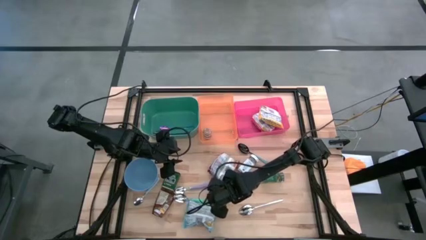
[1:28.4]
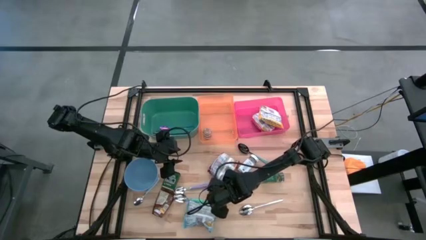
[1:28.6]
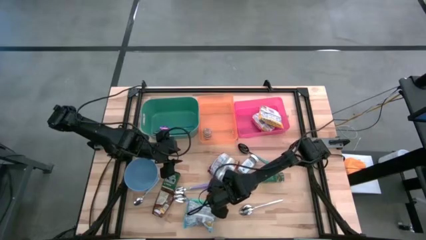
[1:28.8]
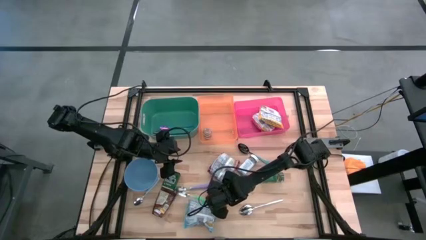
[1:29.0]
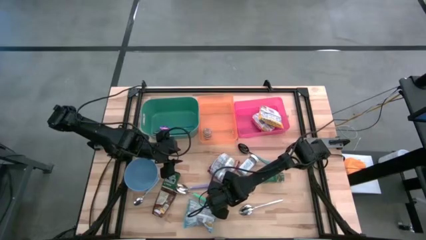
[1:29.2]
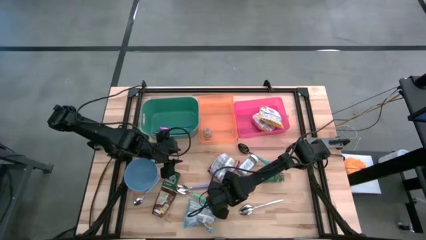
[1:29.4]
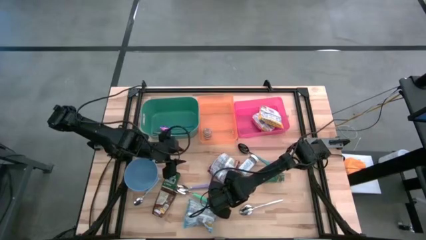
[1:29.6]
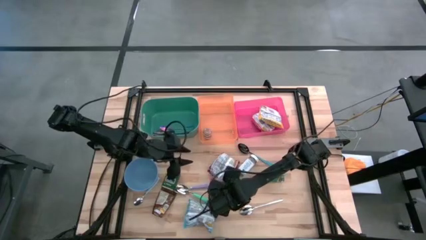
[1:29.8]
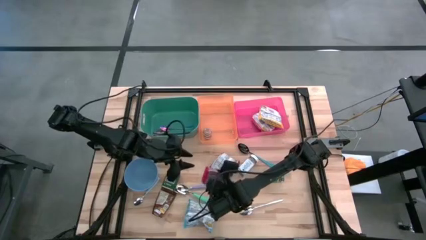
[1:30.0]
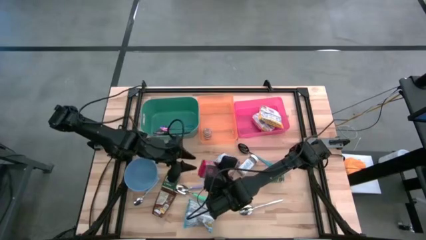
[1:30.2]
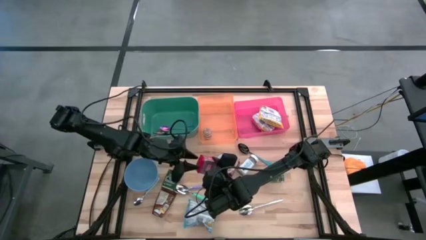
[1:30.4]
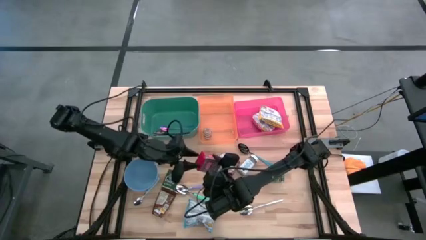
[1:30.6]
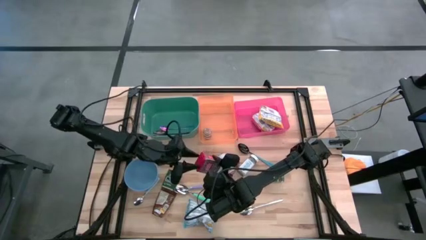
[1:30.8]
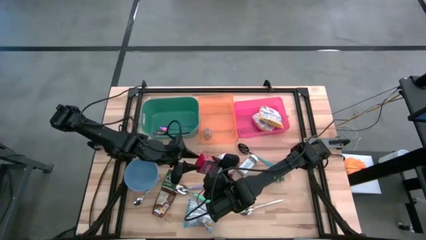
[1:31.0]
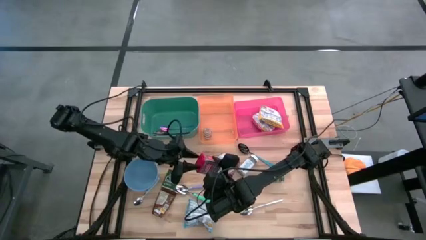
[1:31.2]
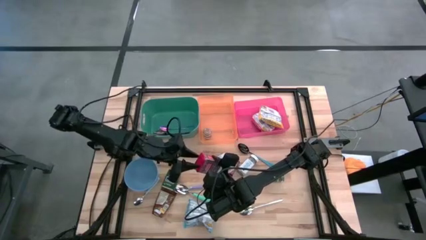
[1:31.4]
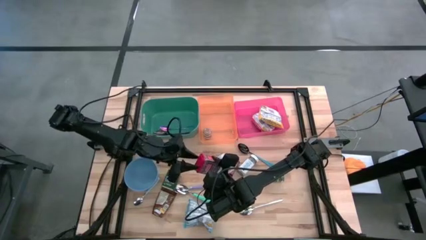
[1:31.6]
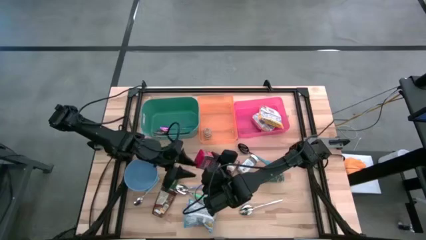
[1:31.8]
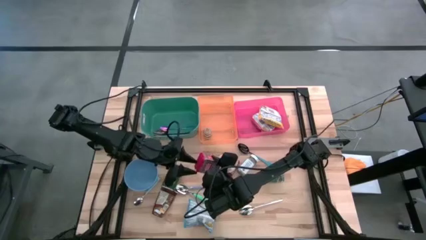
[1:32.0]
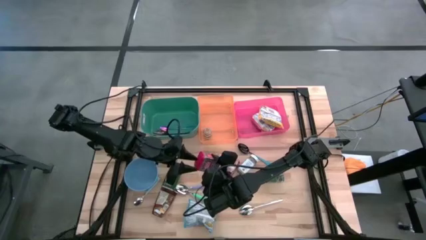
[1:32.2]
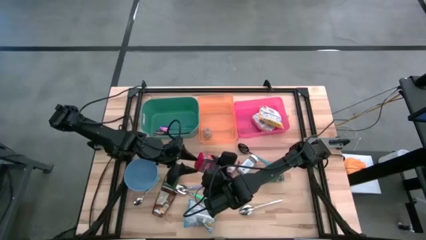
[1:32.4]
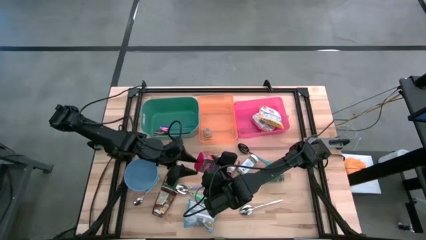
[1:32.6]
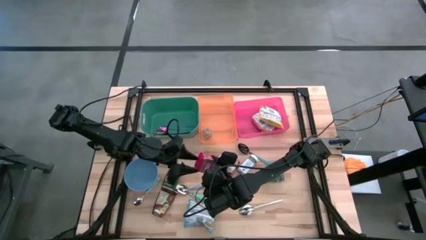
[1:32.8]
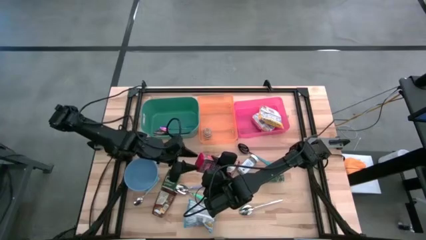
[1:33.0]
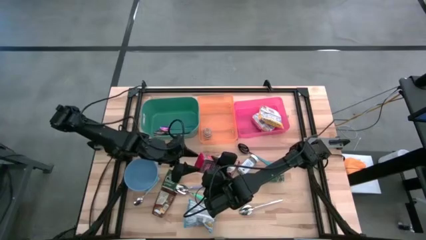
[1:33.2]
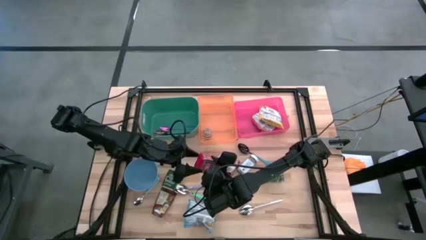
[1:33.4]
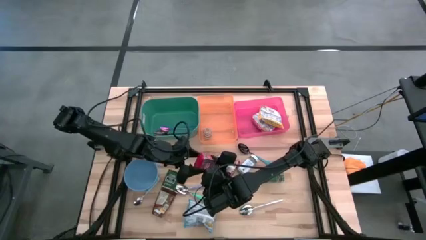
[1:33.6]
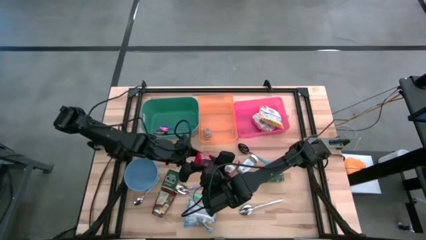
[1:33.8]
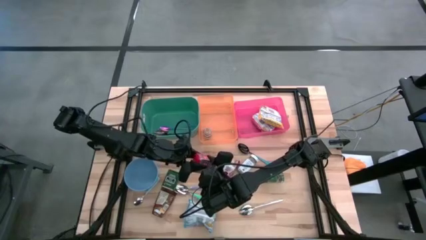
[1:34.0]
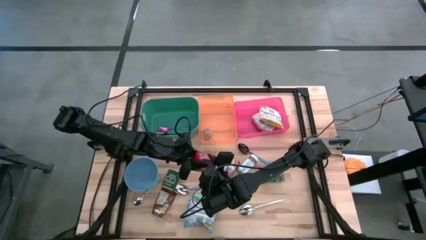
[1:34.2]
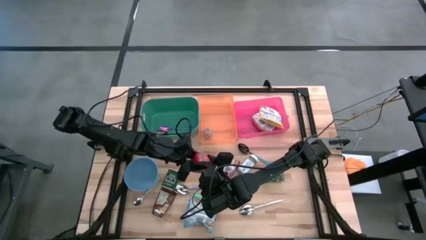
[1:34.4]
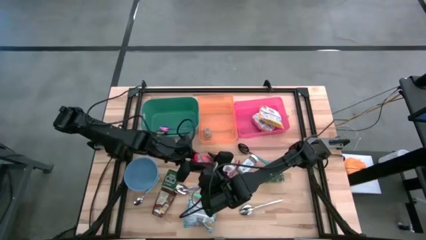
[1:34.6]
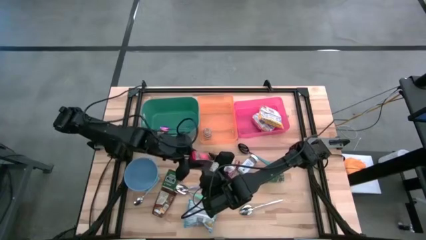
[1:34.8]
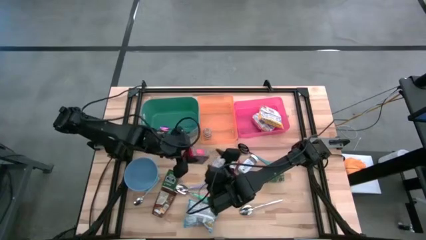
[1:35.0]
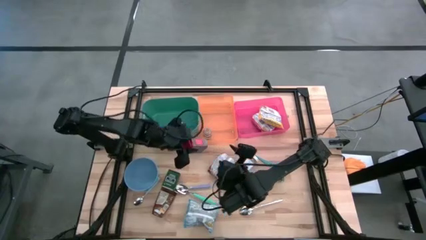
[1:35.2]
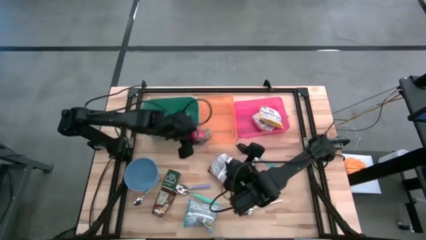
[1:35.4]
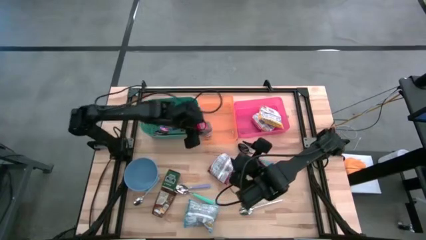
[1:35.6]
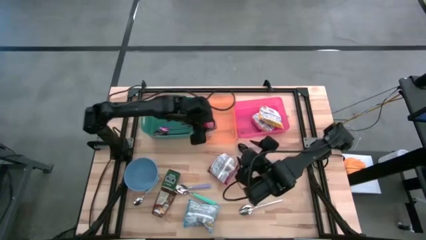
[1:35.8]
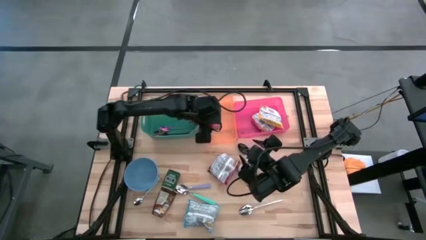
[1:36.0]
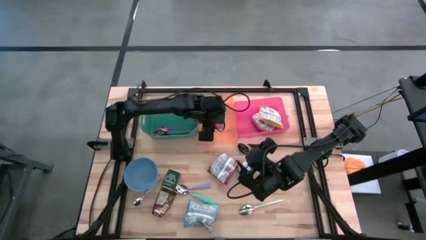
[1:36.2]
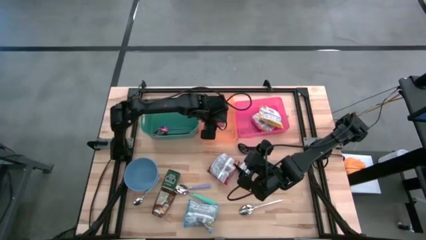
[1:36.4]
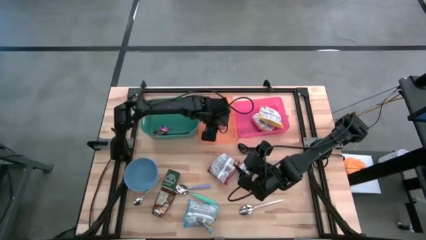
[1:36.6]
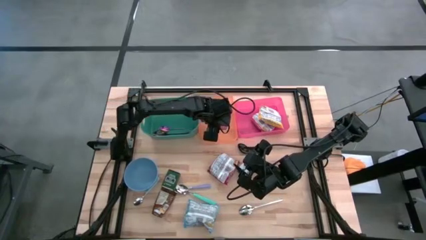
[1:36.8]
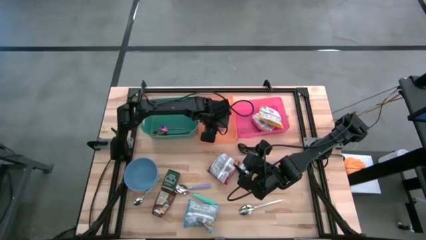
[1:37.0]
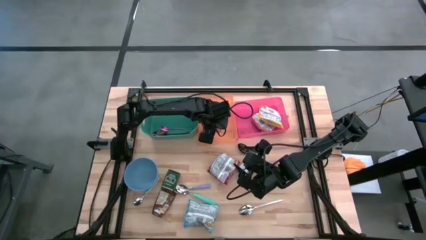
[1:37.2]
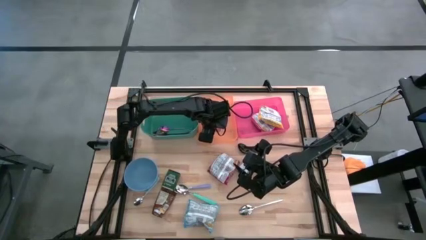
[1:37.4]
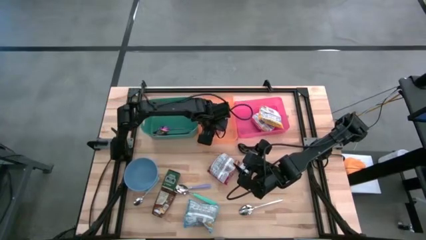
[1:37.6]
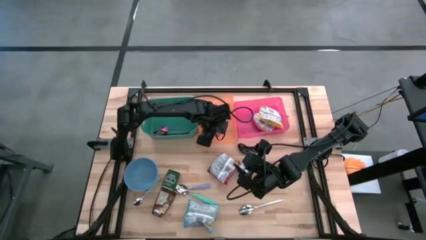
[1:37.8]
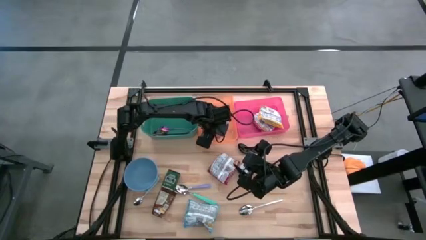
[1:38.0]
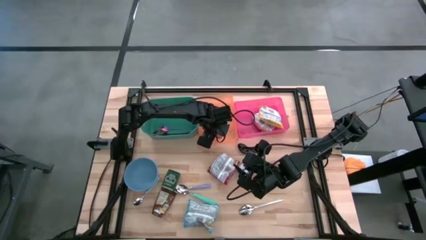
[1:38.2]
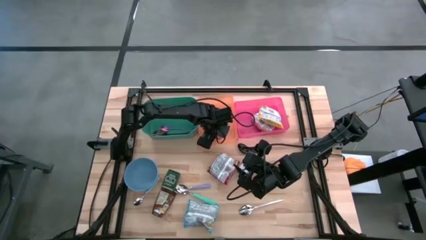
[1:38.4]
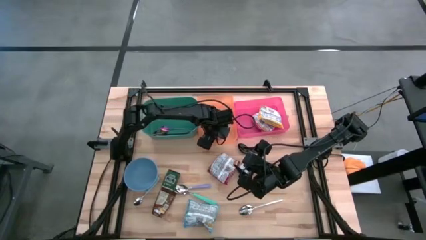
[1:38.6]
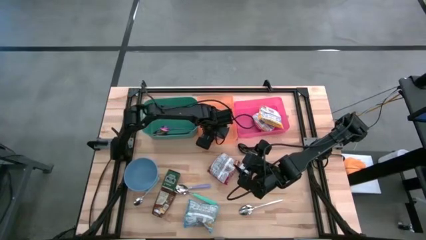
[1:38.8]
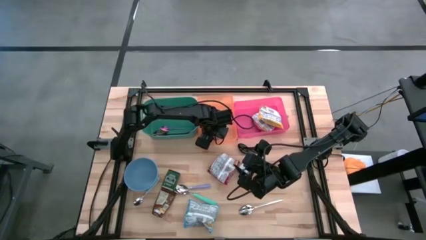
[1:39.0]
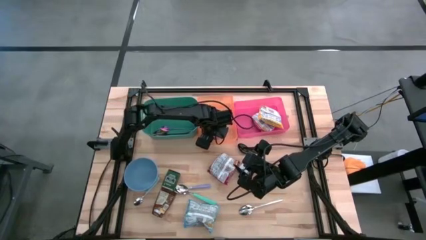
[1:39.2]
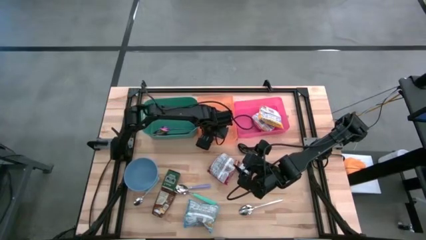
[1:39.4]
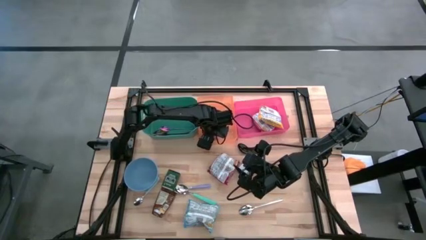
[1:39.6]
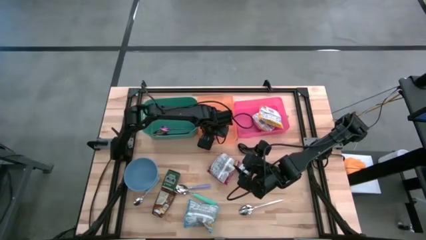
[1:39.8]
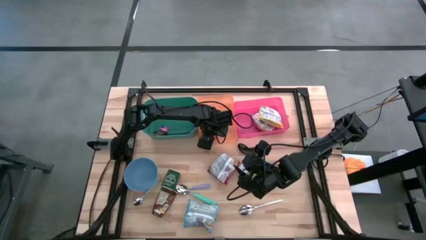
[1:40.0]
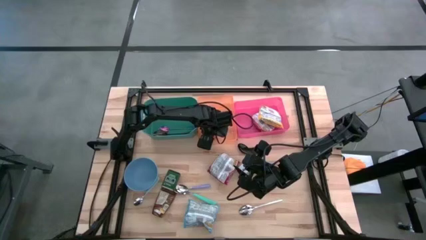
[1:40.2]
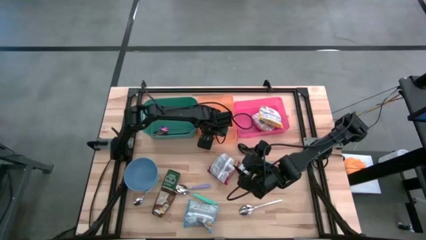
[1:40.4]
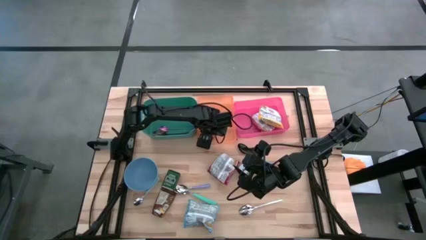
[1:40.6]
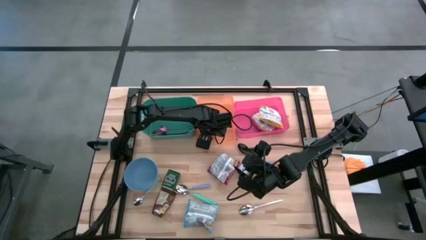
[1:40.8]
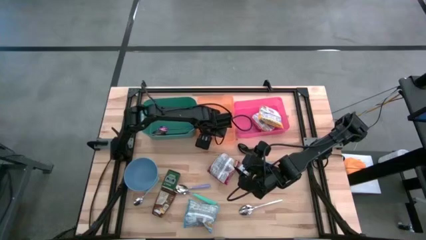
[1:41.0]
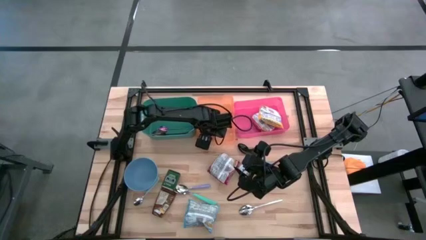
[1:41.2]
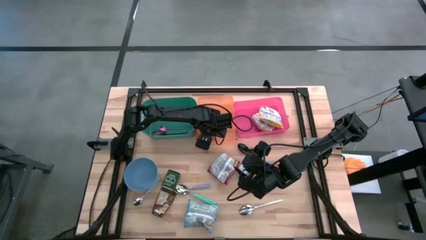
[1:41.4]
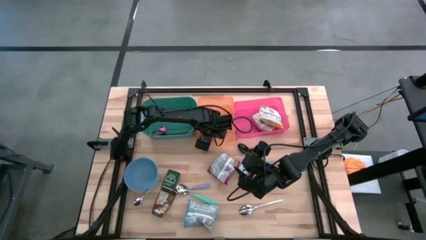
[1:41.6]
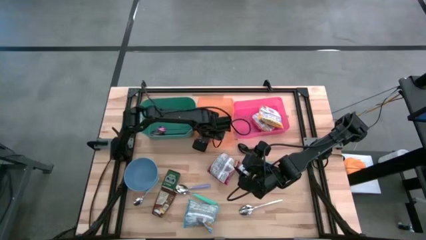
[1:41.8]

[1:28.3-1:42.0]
Put the red seasoning can into the orange bin

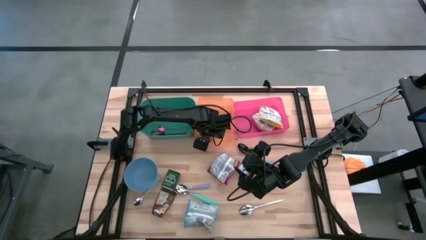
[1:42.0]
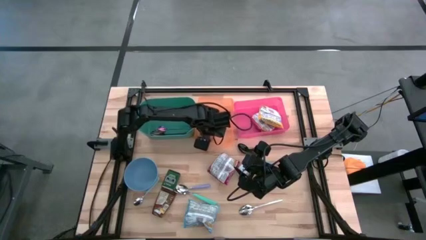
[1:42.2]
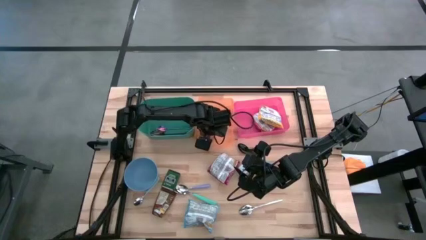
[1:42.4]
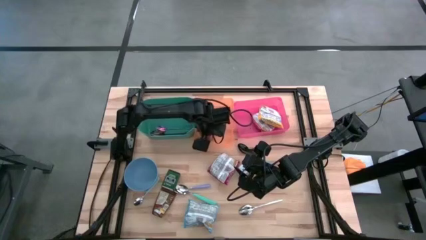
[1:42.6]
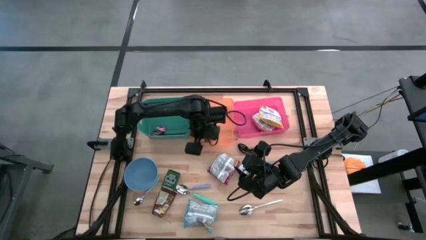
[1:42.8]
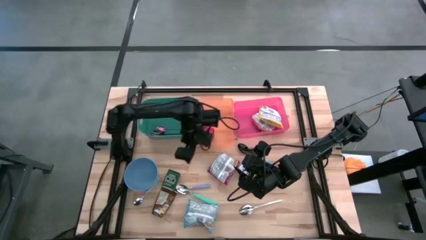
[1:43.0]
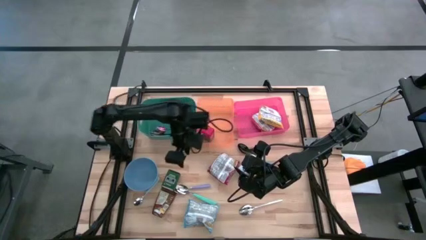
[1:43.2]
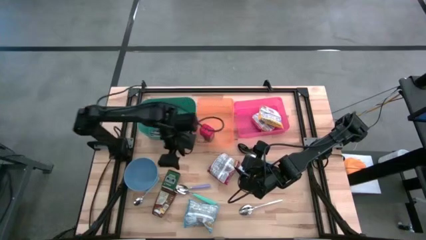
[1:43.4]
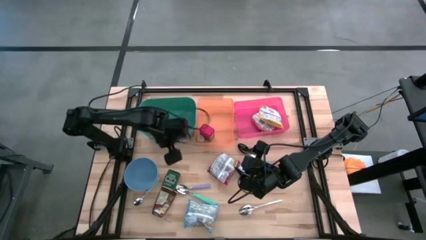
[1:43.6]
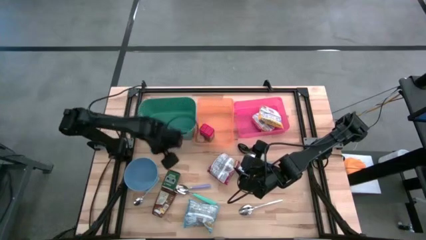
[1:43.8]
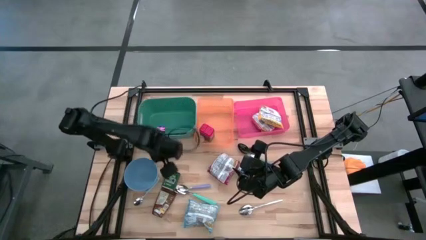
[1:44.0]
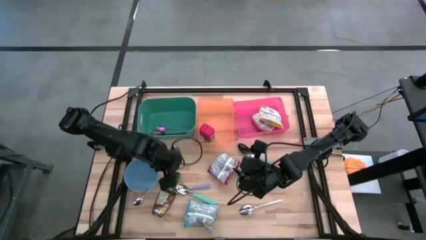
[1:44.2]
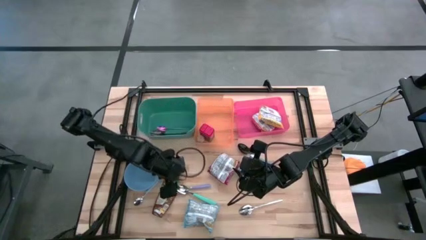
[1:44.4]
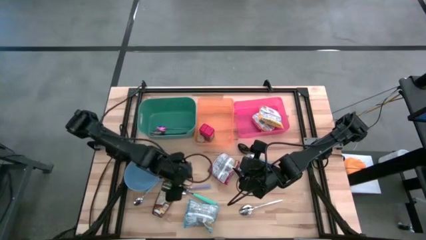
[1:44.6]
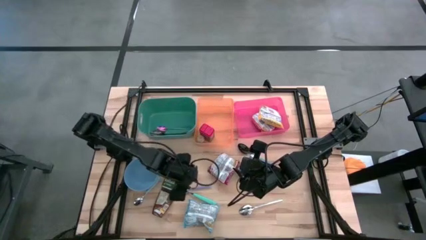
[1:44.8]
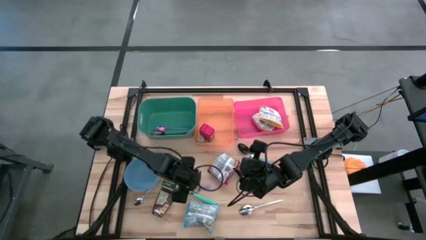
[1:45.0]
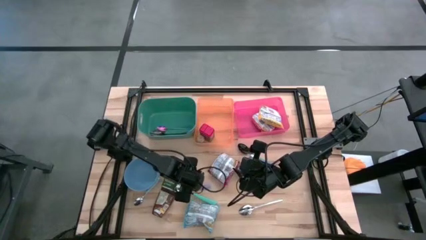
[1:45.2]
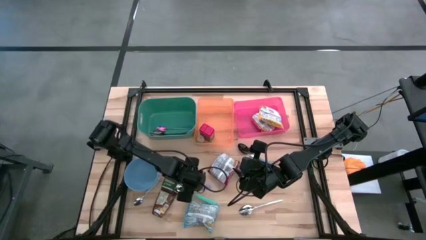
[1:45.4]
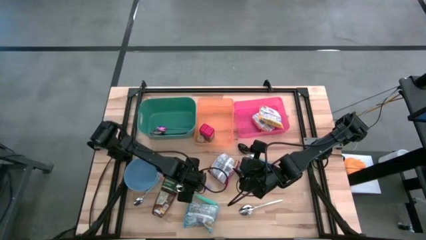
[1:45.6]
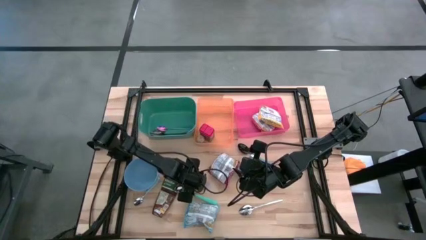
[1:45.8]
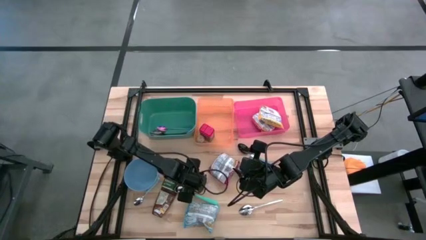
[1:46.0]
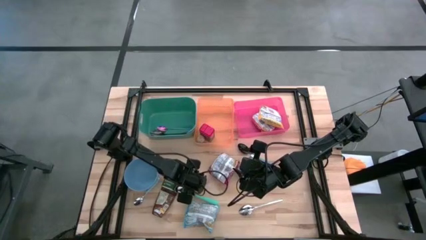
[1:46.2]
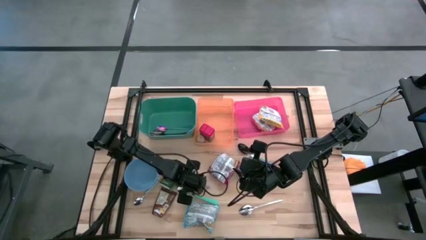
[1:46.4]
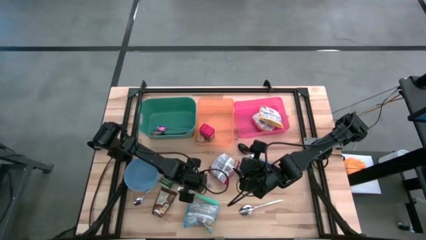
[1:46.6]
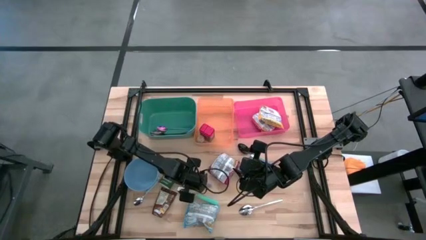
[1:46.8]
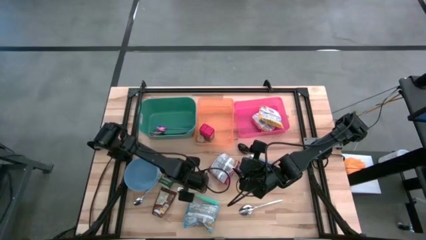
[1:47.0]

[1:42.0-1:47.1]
Put the violet spoon into the green bin
